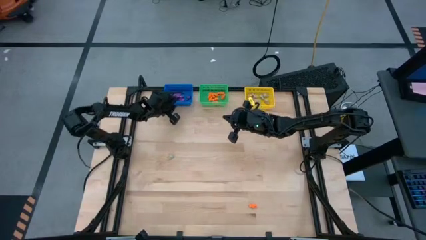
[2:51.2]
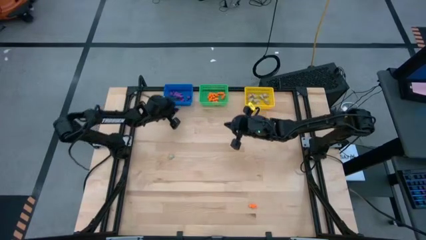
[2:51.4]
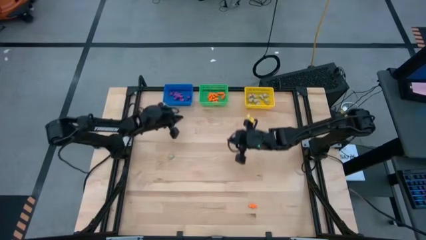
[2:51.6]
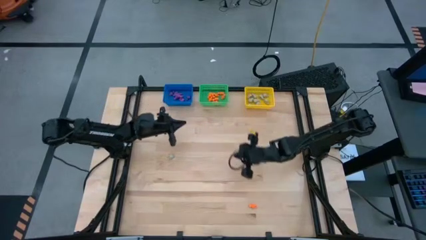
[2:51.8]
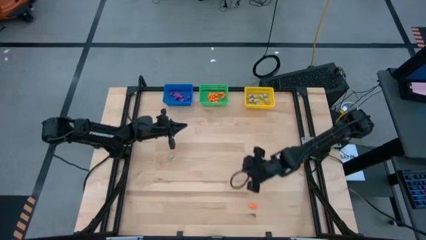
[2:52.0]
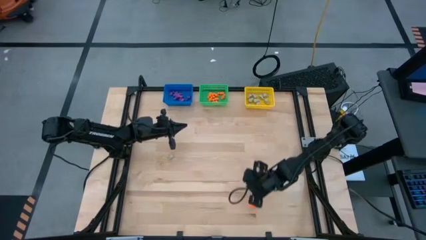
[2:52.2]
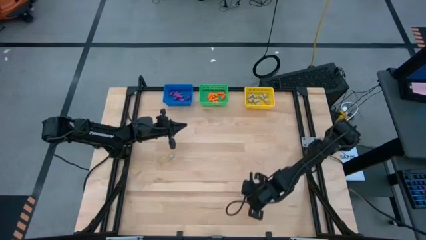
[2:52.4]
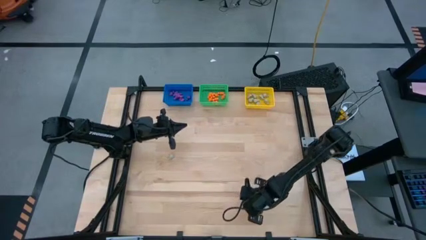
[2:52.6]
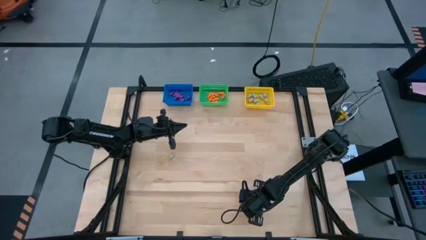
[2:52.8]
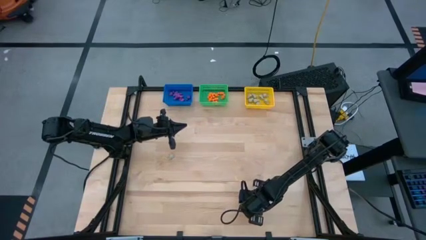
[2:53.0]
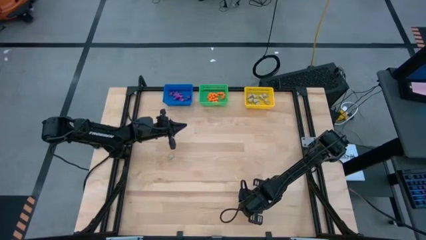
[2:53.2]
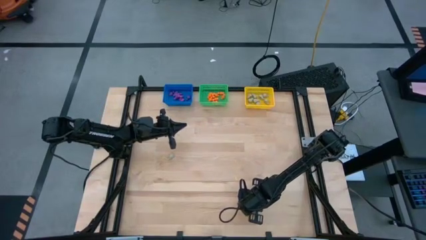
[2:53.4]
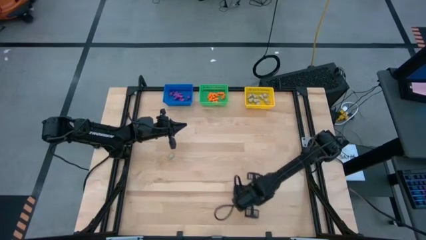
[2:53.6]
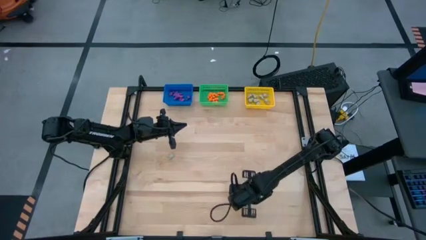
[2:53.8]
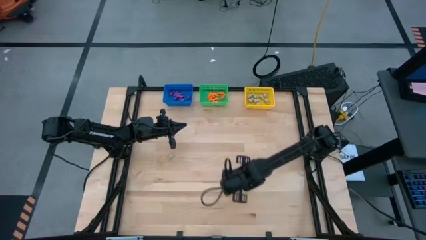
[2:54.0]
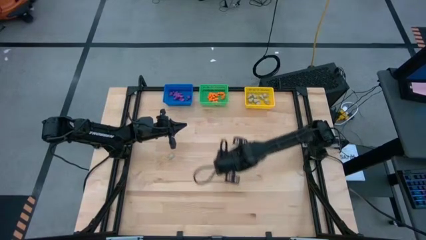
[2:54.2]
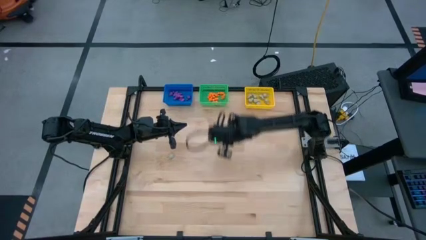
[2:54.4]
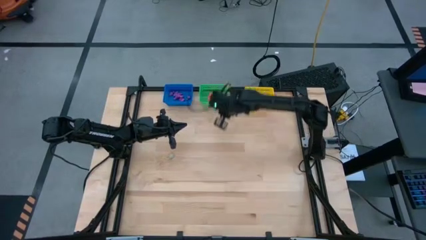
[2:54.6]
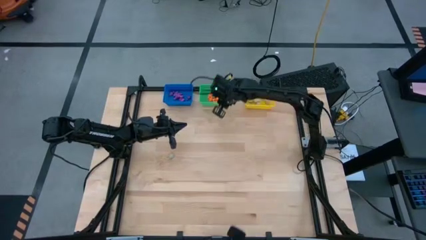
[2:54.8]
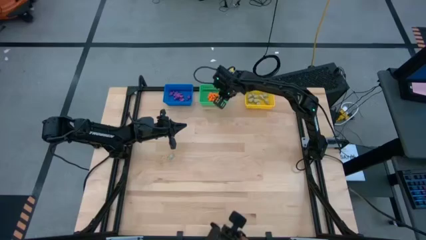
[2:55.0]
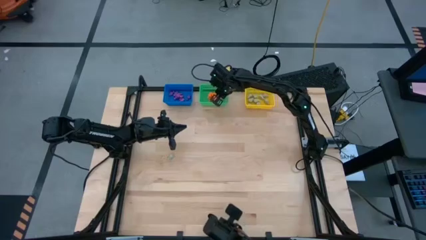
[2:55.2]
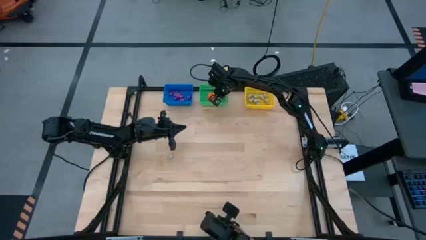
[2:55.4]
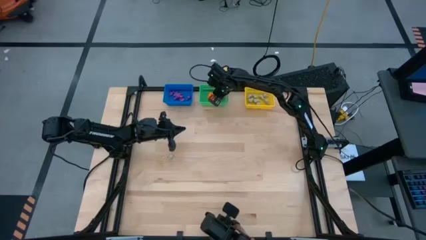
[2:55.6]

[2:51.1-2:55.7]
Task: Sort Halloween decoration
Put the orange skeleton toy into the green basket

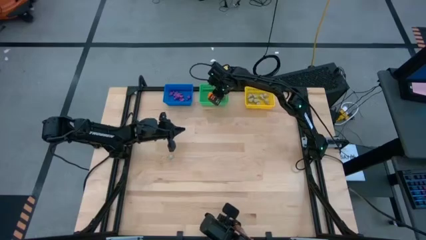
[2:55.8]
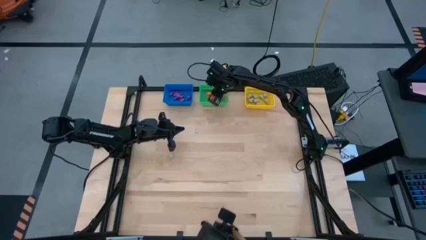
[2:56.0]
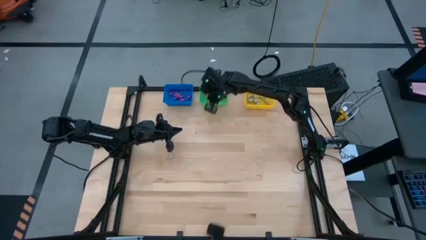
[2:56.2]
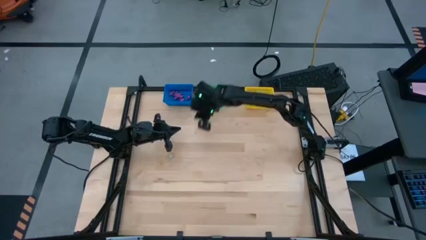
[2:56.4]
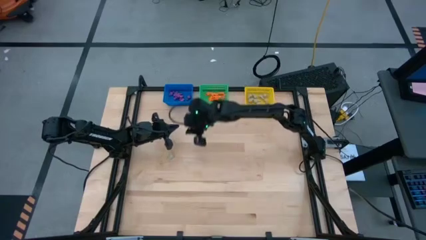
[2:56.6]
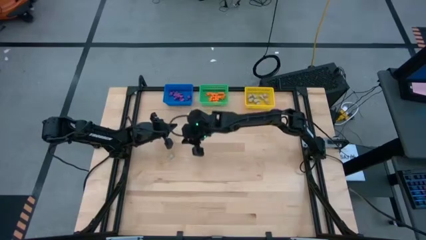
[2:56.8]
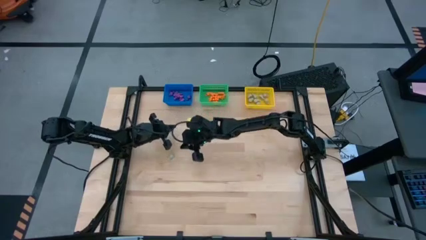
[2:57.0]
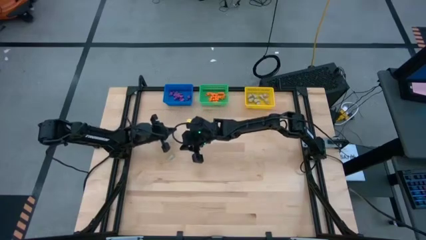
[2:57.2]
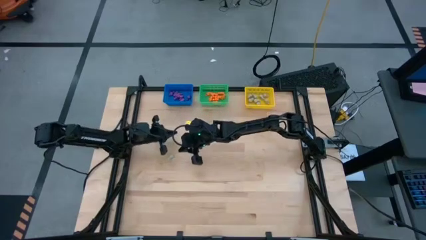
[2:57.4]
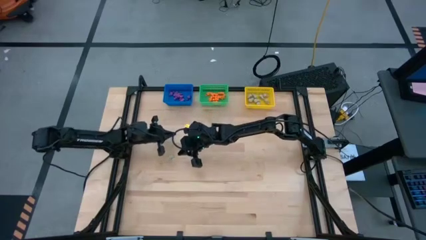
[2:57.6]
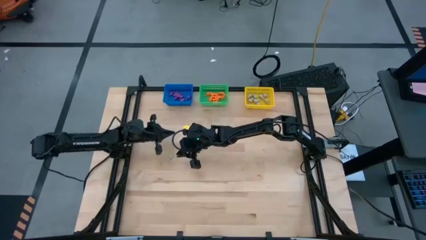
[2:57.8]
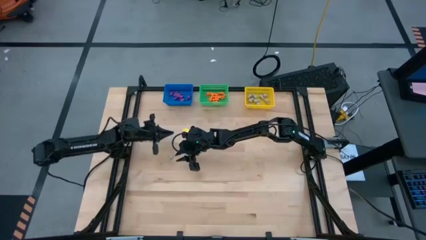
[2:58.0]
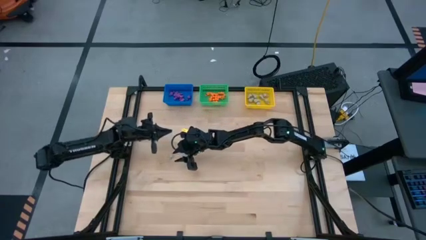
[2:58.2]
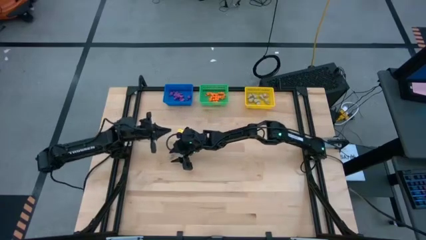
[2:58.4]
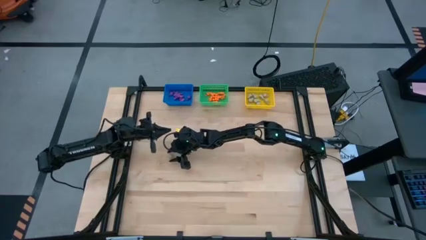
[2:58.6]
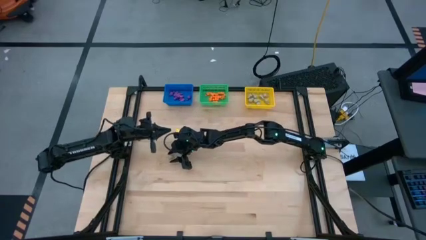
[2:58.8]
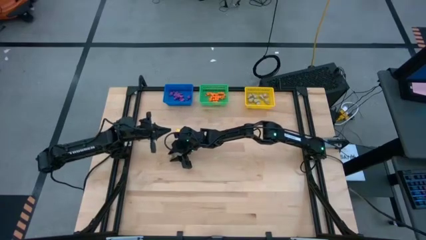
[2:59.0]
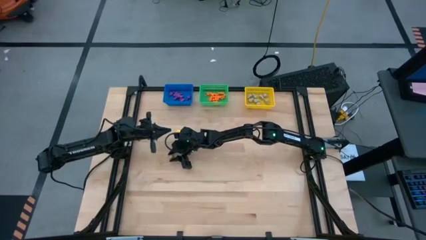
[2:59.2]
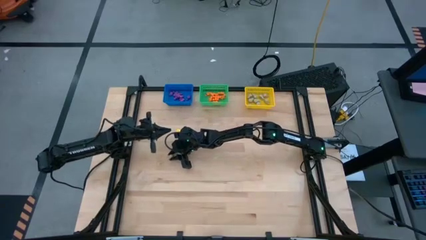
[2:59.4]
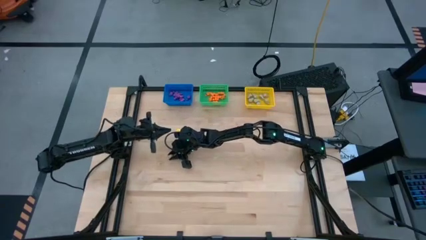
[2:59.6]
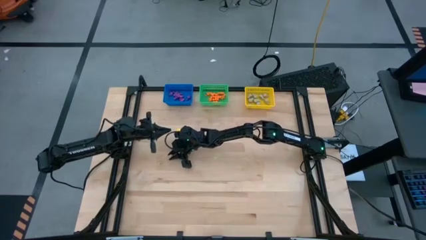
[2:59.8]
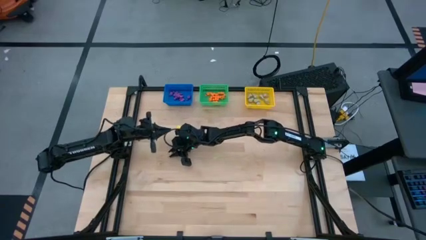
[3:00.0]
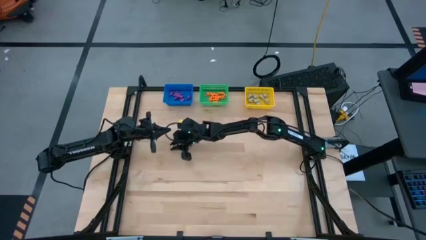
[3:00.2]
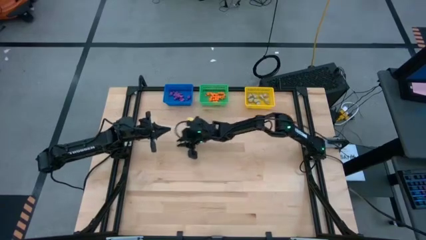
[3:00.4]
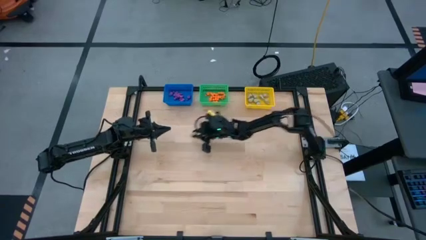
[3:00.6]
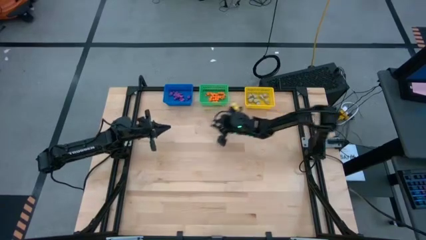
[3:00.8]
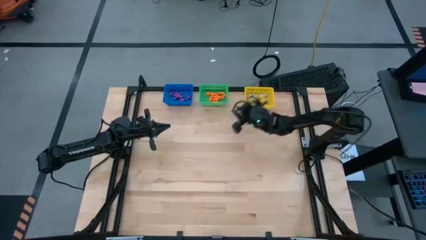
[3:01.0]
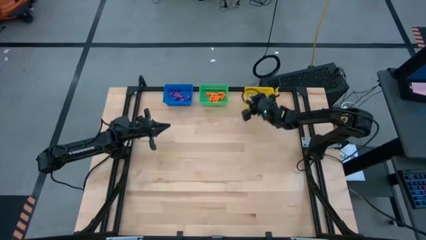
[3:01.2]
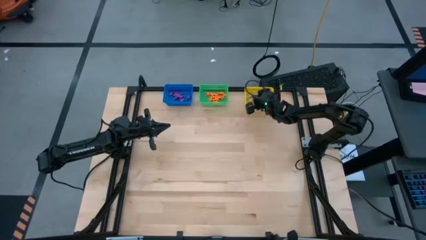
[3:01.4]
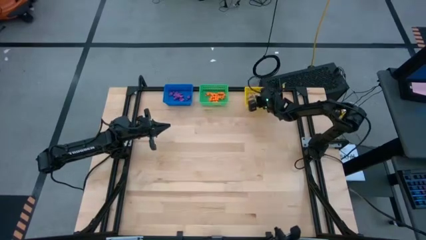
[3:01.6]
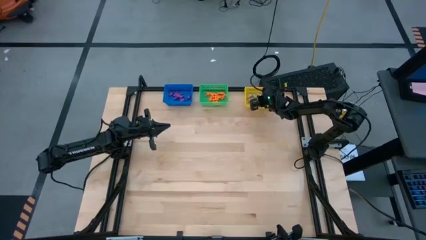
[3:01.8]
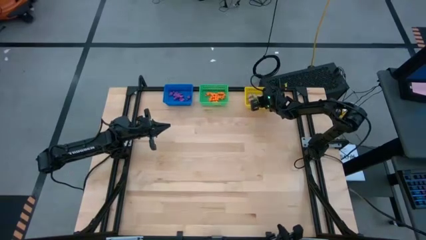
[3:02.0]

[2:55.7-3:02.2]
Put the grey skull toy into the yellow basket

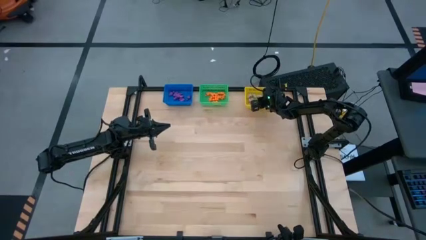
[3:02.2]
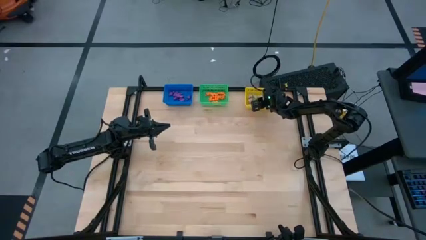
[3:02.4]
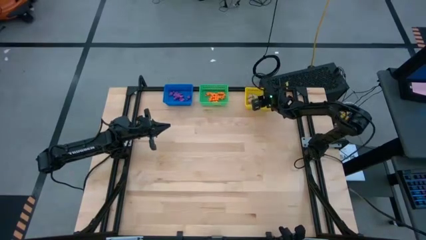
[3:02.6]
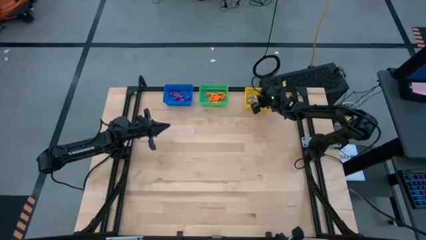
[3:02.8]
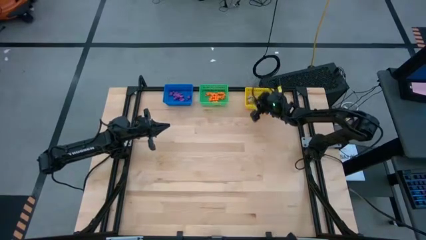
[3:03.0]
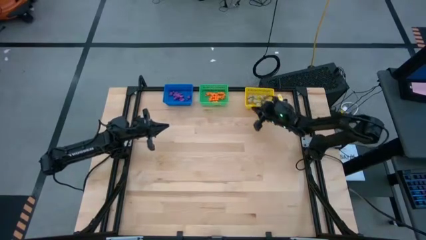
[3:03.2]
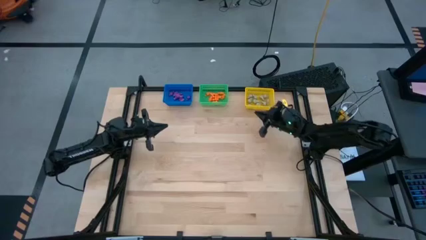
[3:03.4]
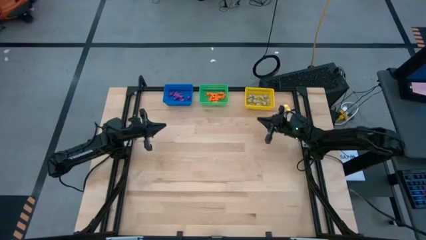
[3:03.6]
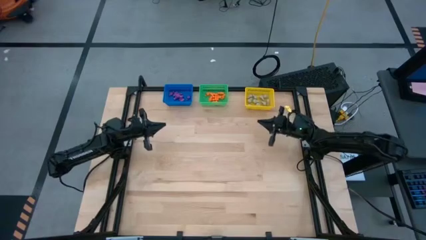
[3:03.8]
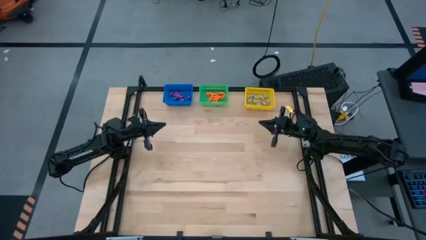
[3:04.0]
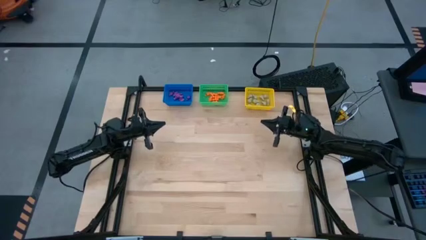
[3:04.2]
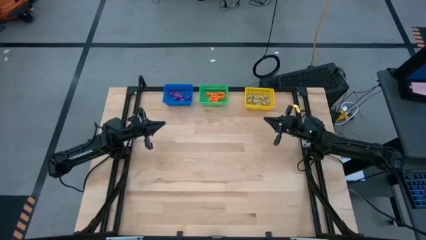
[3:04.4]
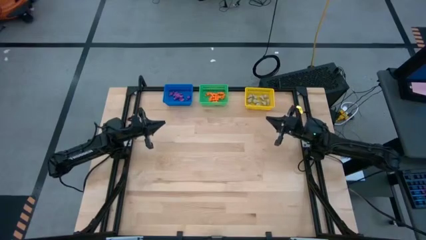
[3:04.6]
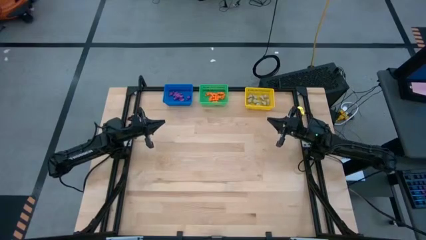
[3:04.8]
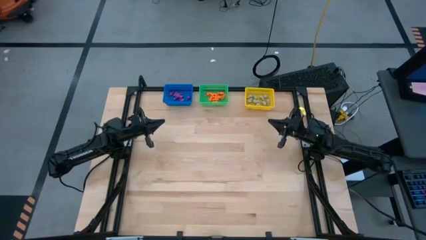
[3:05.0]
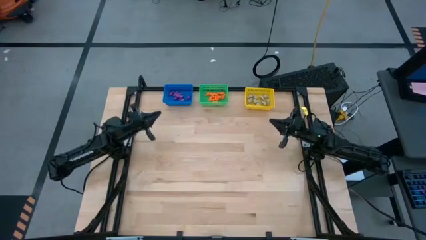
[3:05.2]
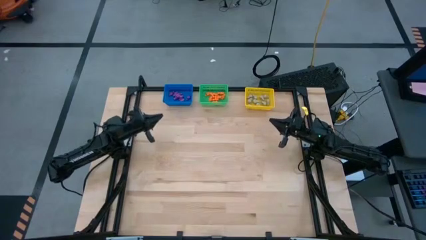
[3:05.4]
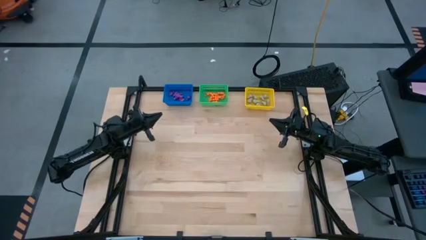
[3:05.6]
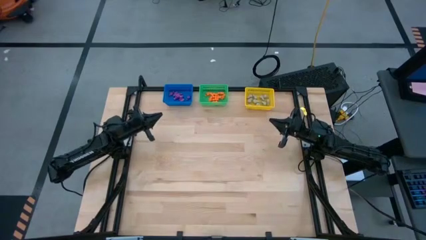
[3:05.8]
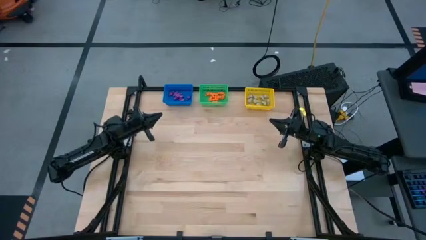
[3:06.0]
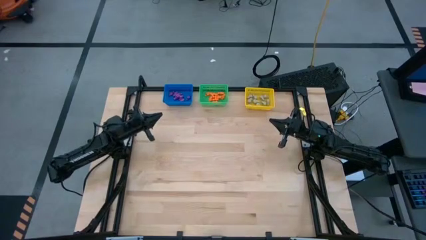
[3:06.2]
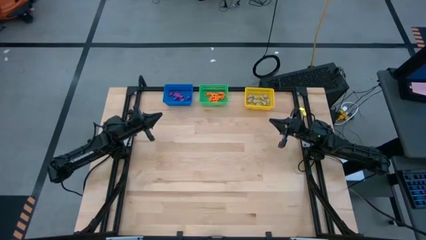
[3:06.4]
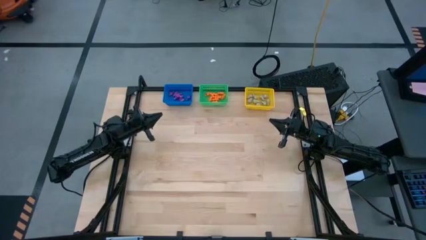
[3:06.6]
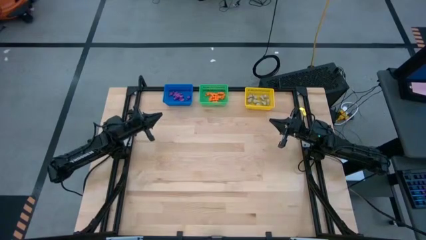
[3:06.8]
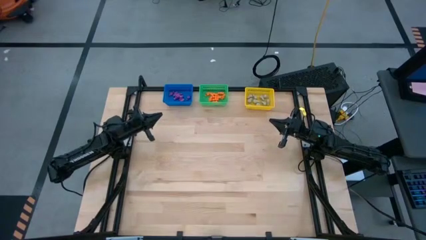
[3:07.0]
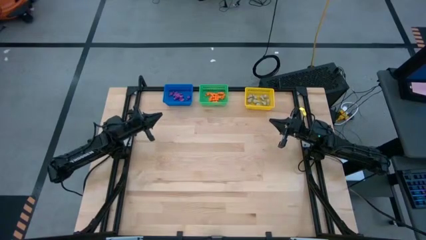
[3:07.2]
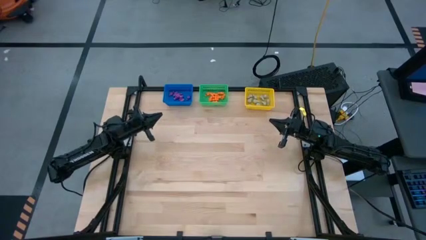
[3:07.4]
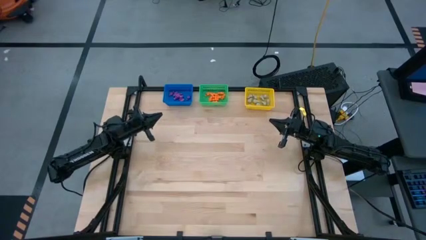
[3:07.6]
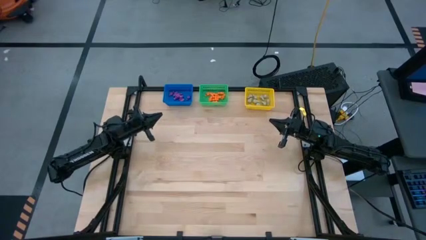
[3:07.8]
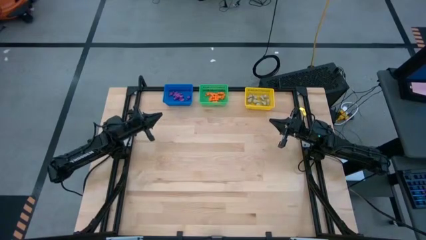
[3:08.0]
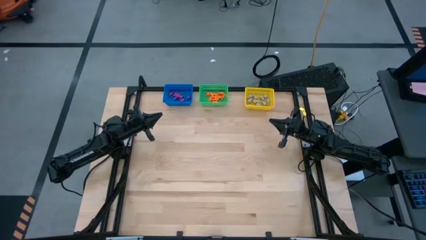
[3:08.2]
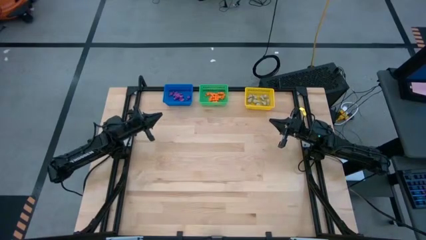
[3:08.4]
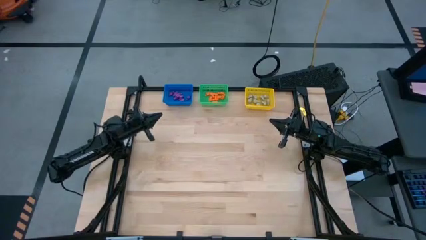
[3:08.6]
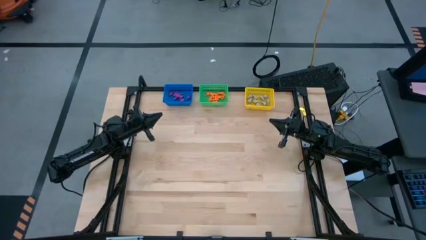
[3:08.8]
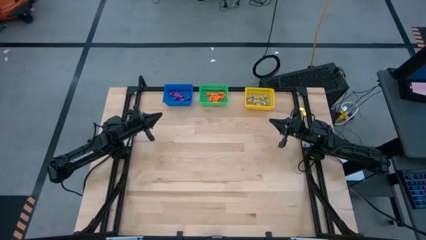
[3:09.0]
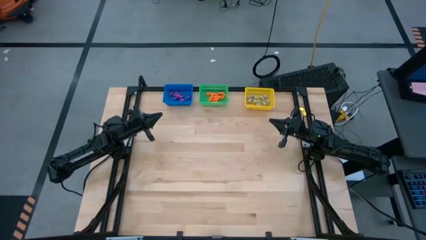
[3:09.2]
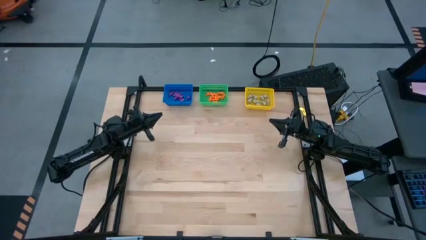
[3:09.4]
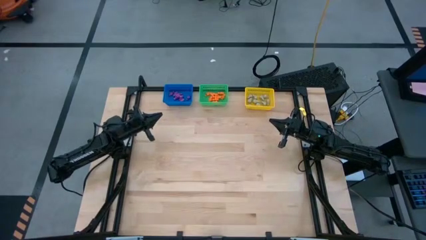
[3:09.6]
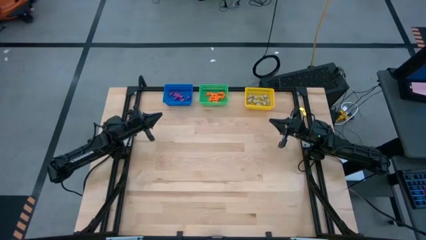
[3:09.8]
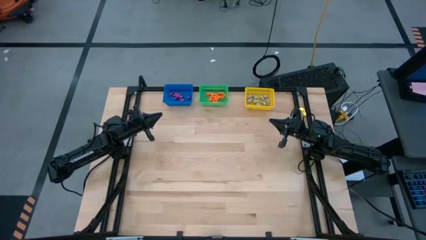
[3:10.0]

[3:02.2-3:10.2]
Return to Home Position
